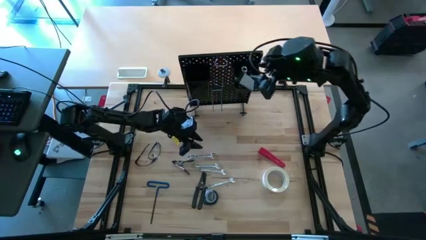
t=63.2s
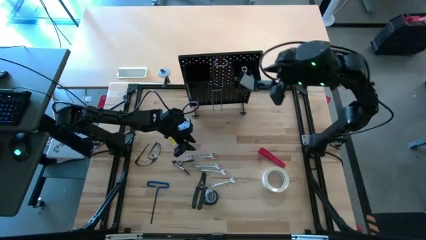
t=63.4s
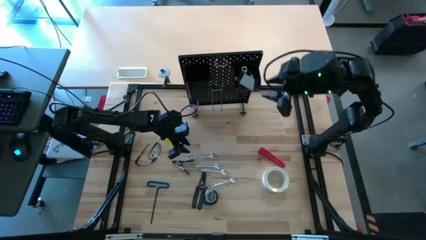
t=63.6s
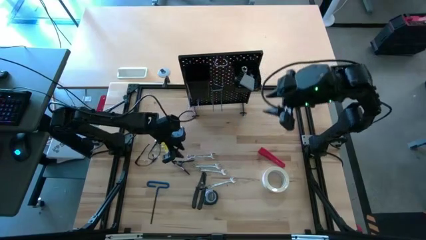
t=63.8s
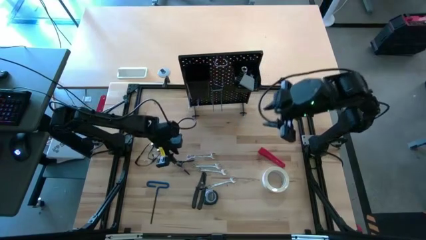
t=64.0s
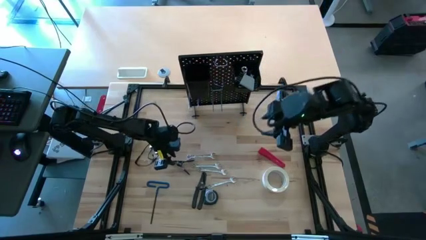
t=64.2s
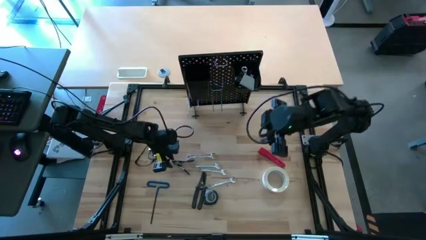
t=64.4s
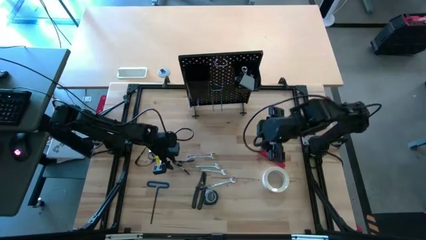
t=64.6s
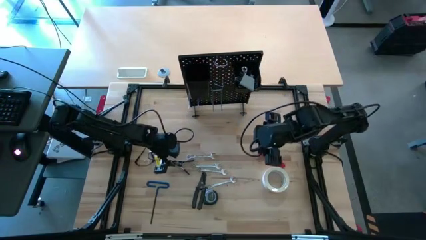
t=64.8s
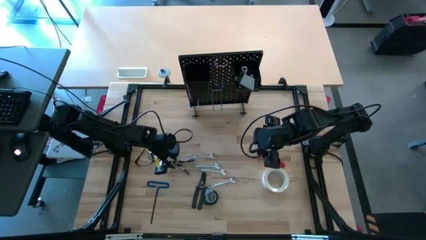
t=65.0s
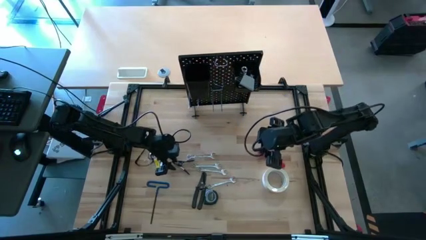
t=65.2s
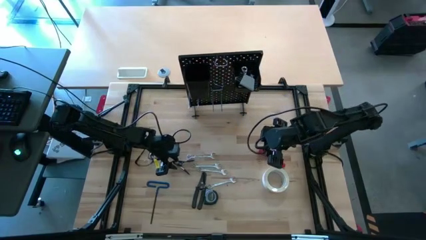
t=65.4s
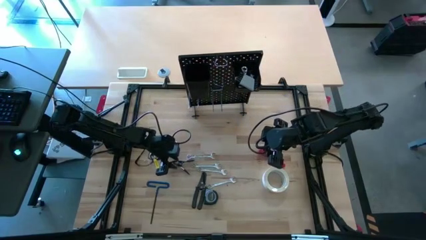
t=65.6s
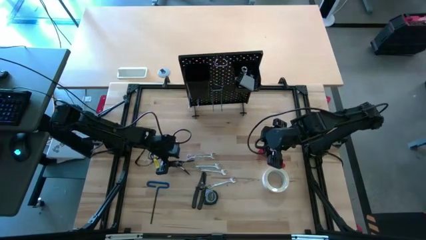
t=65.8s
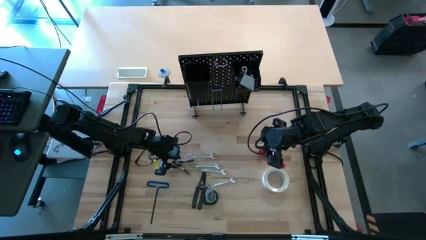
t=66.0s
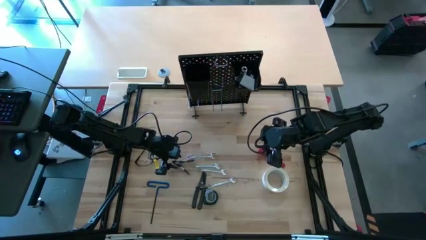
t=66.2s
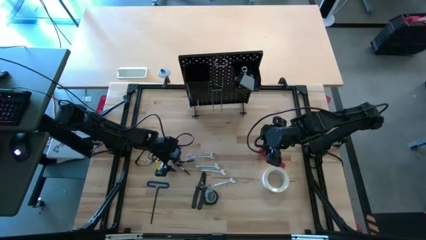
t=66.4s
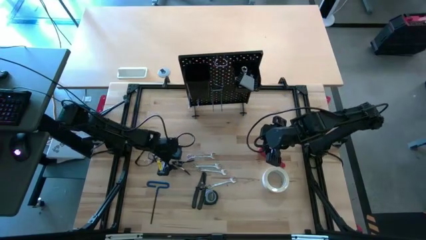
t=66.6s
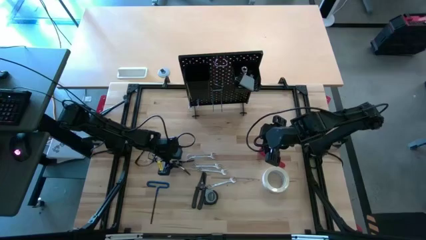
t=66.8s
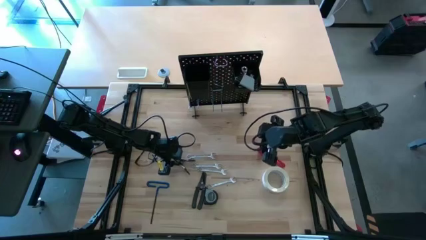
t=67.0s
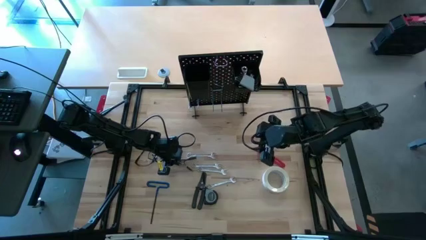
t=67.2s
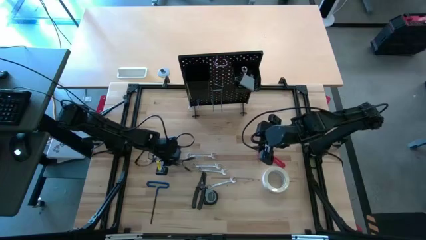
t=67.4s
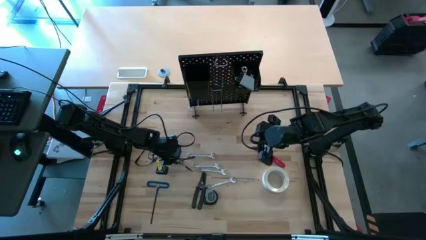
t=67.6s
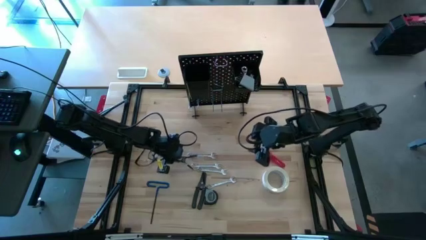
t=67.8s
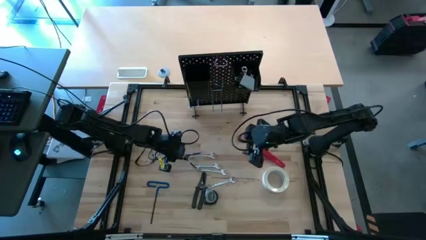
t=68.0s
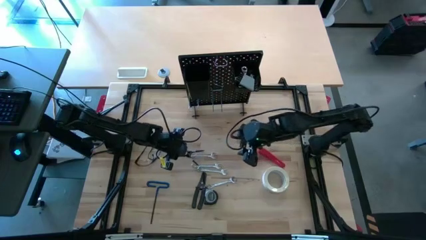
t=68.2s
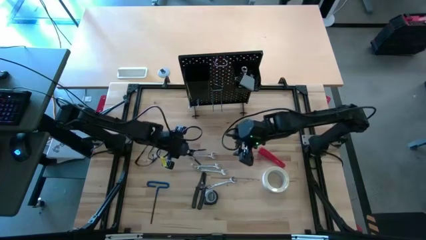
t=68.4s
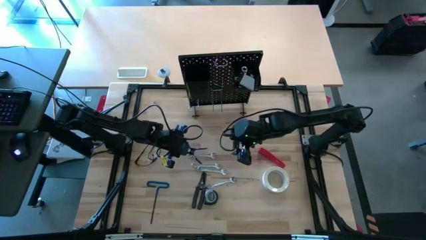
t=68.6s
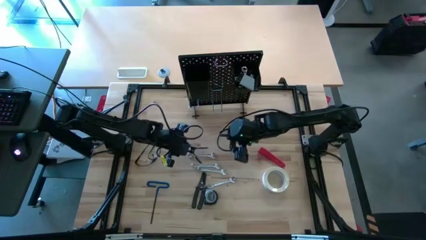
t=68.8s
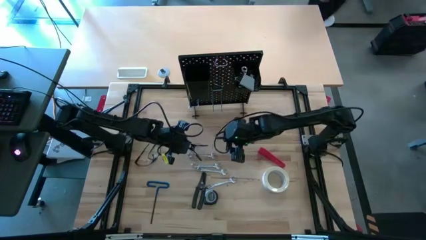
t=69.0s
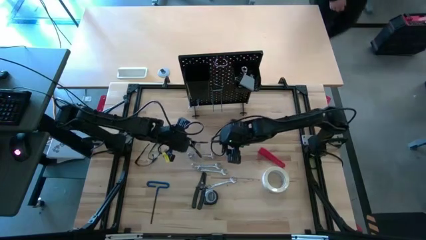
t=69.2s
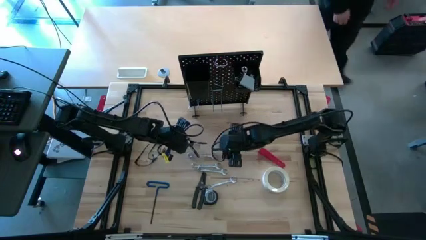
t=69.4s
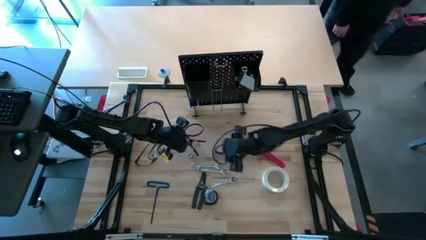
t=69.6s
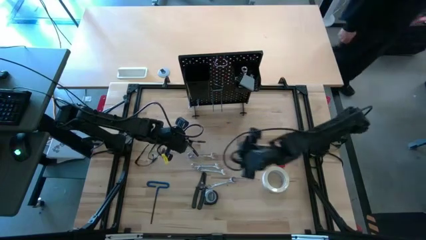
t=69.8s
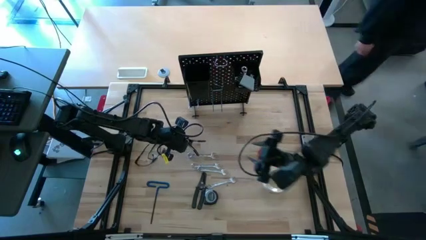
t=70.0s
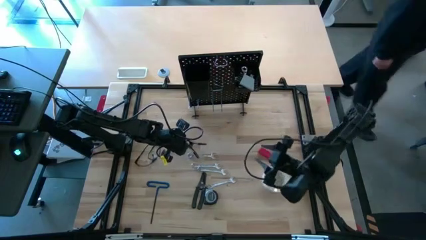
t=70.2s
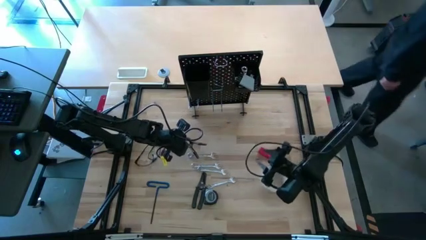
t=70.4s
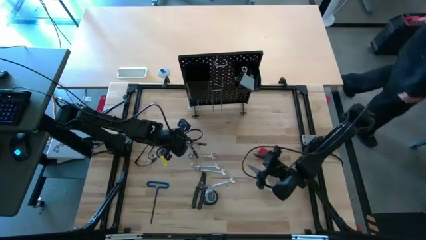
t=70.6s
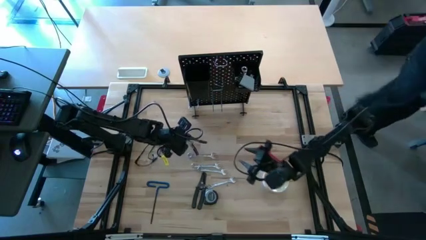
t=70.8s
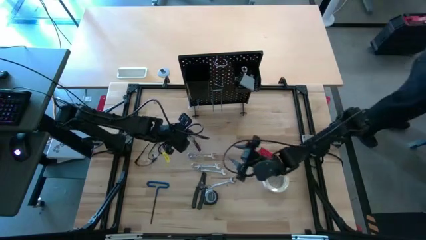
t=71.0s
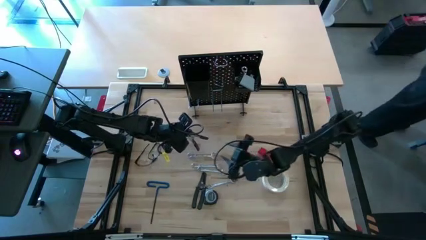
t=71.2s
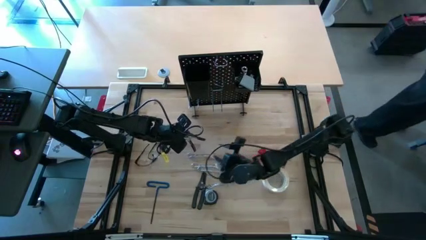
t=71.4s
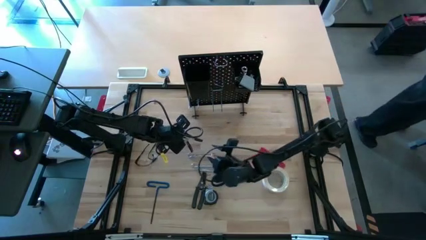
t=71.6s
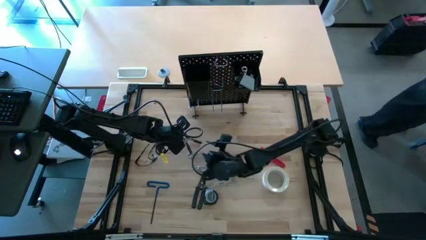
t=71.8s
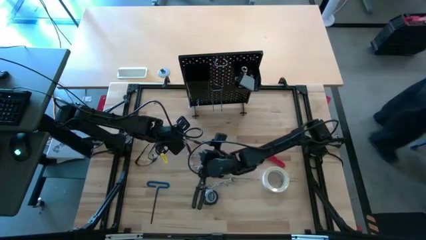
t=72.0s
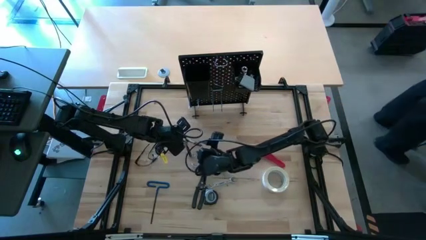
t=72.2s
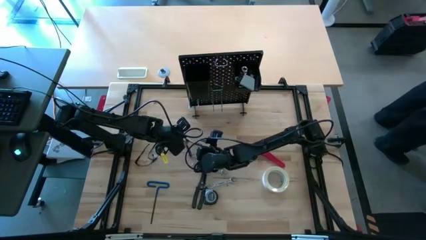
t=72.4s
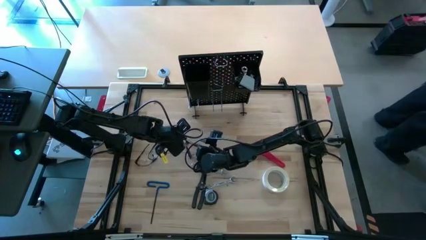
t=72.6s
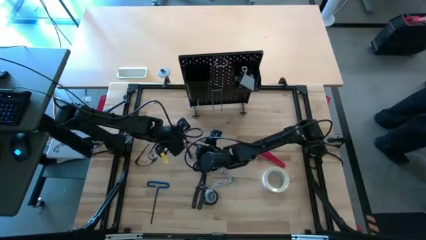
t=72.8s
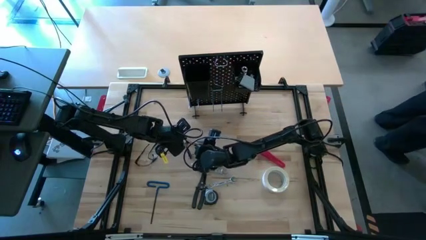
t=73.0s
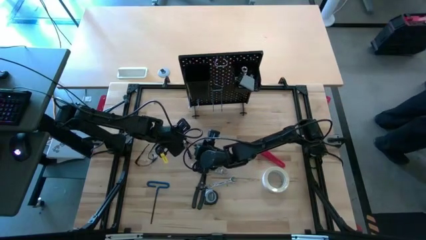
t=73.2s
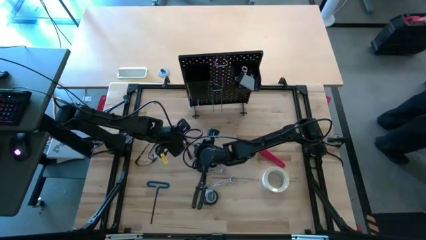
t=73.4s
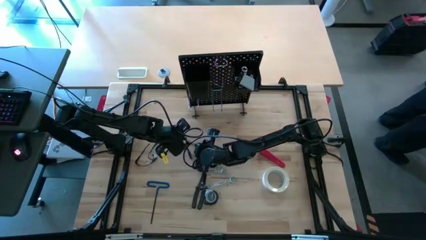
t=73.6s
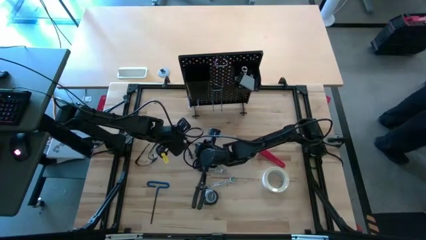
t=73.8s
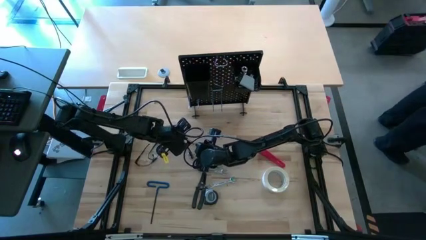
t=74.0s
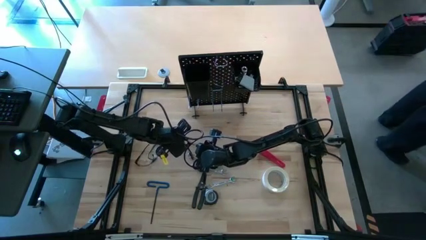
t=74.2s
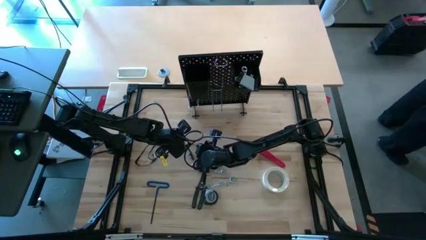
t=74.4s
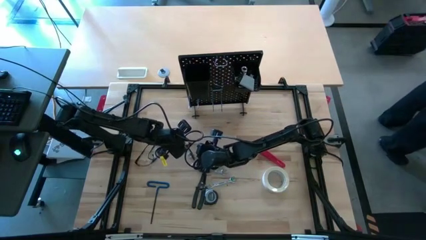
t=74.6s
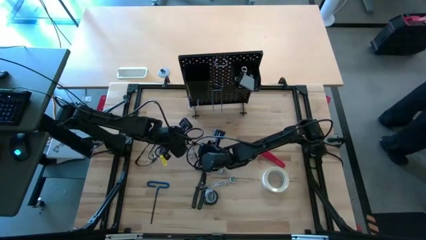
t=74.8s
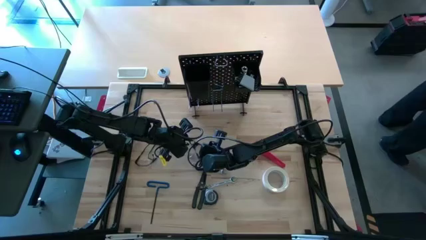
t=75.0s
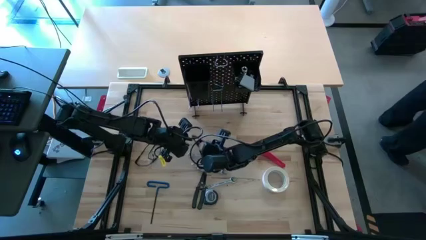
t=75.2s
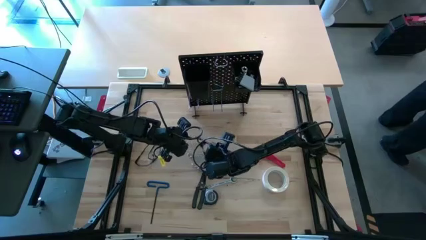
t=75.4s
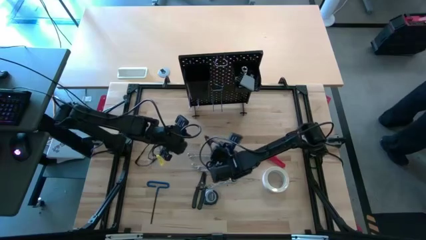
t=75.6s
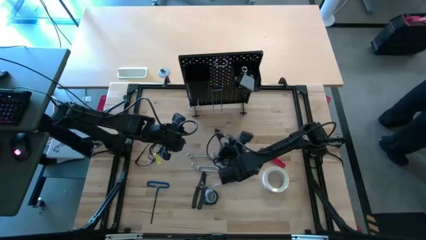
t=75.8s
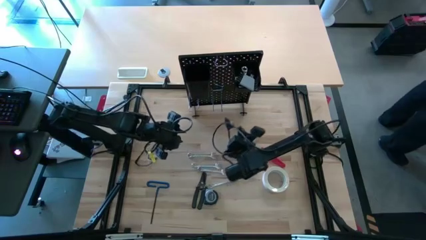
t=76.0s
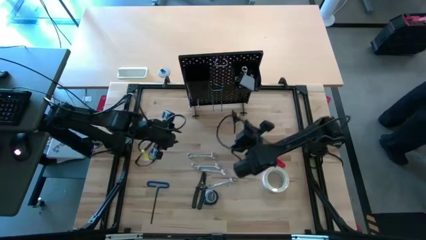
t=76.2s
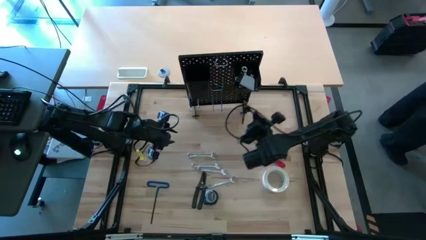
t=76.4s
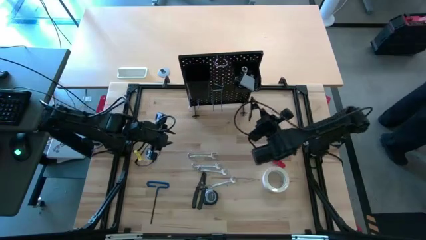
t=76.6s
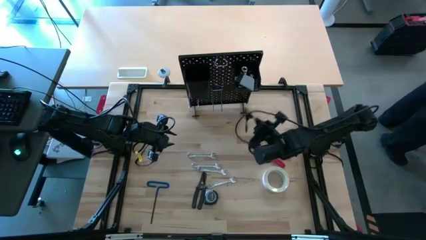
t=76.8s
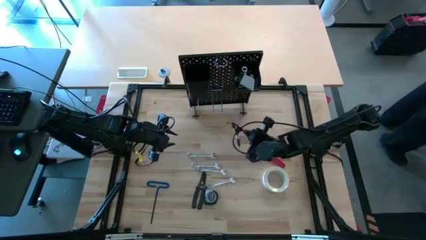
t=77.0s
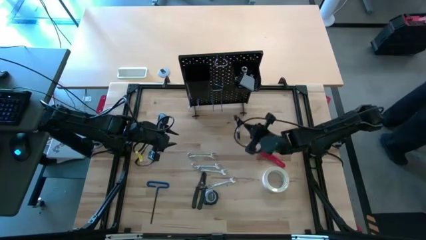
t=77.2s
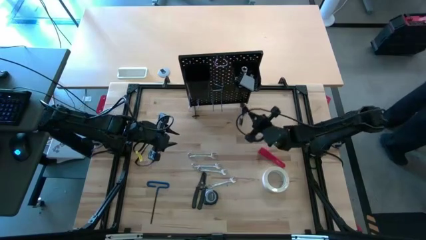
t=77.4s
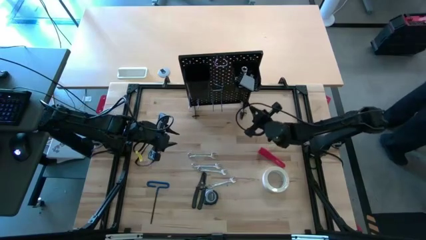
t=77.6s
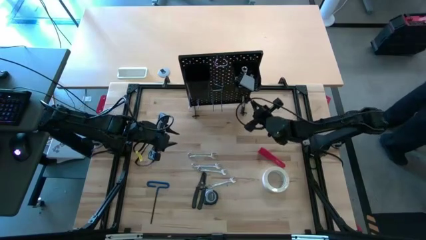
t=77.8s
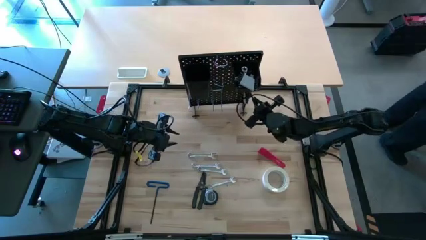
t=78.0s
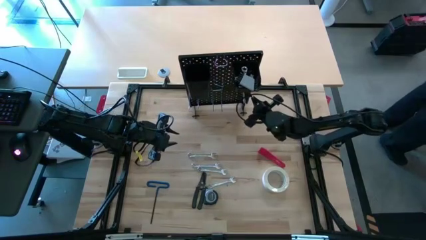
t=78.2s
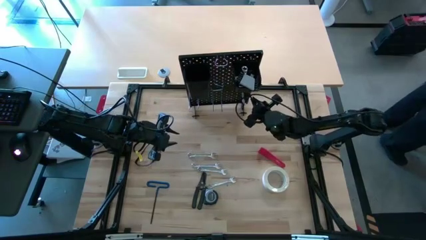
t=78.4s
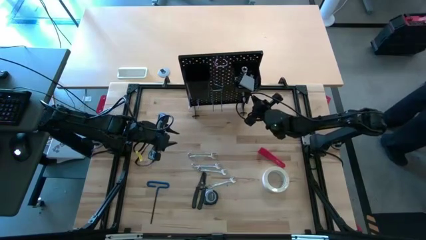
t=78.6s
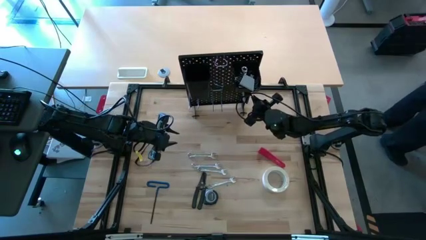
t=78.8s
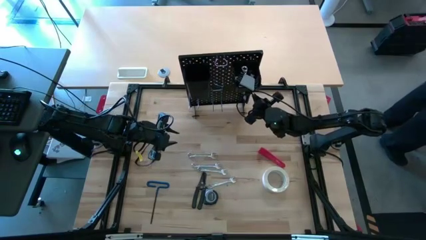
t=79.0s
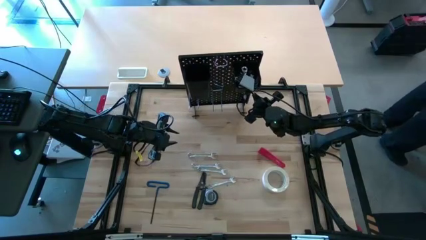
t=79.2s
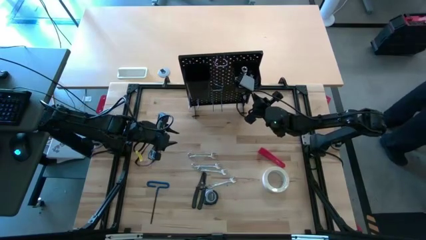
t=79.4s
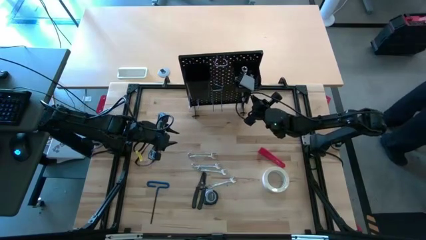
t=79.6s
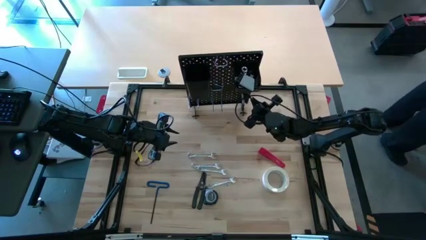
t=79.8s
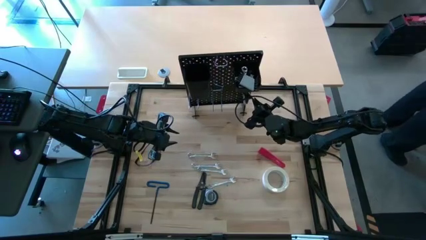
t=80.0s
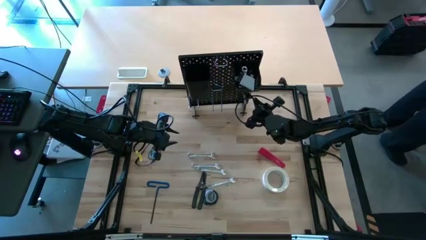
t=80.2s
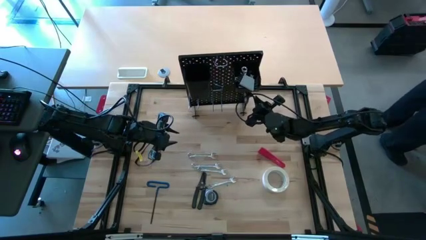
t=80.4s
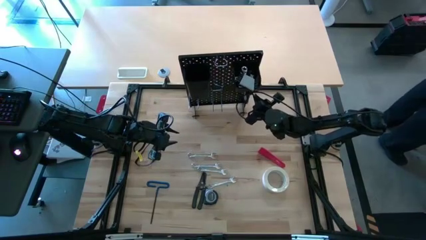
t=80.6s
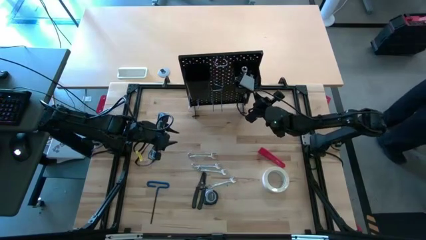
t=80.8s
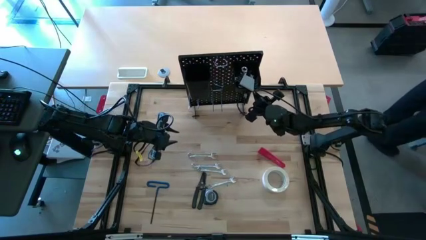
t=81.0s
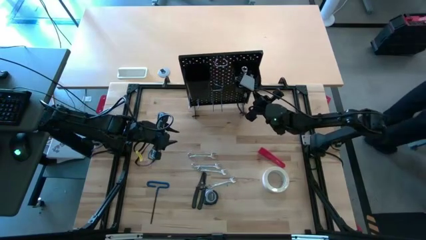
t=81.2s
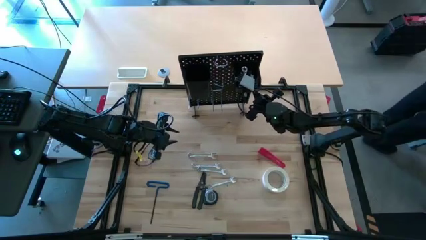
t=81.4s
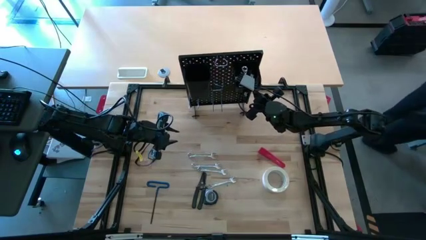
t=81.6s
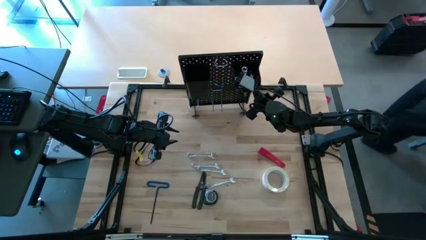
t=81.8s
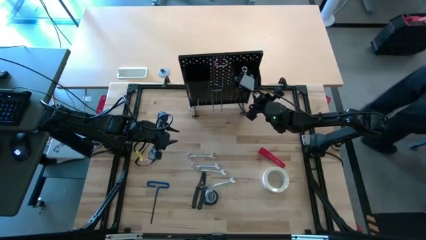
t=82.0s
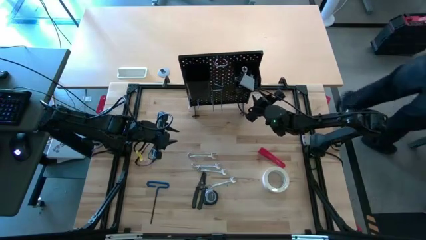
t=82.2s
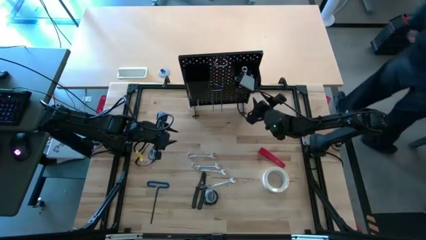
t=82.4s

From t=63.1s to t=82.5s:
Task: Hang tools onto peg board
Hang the black spring clamp on the pegboard
